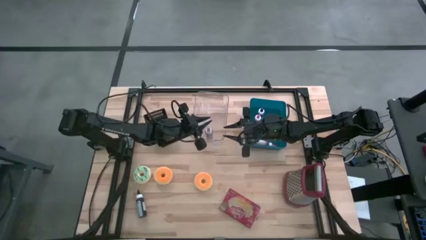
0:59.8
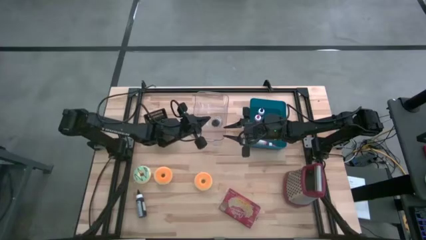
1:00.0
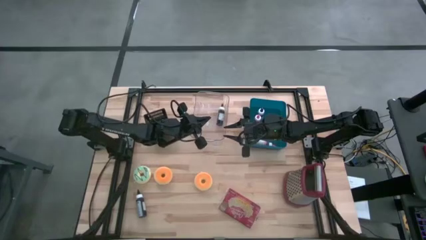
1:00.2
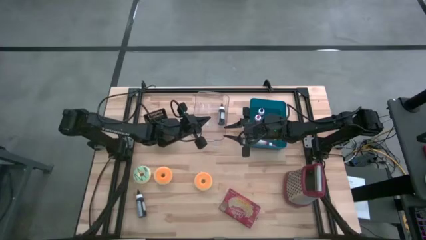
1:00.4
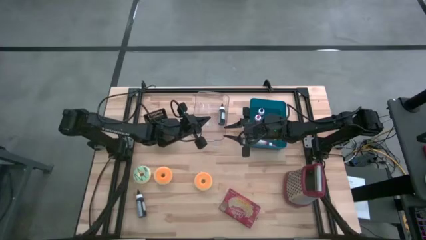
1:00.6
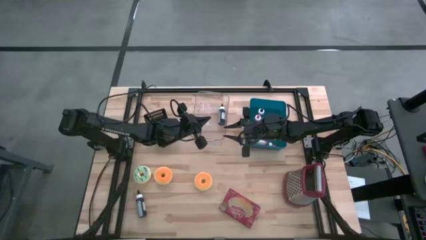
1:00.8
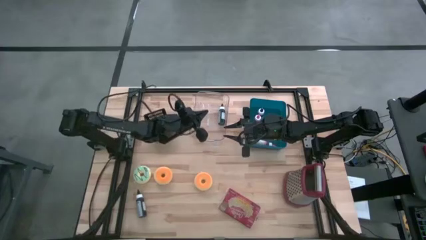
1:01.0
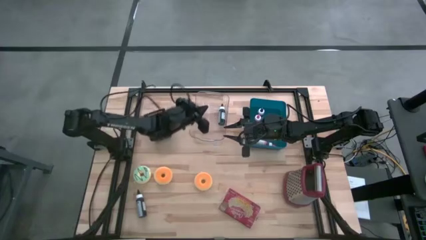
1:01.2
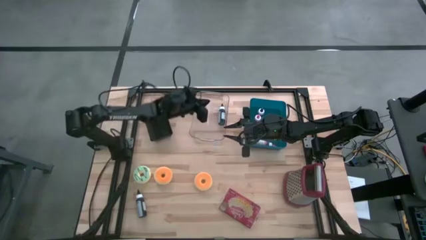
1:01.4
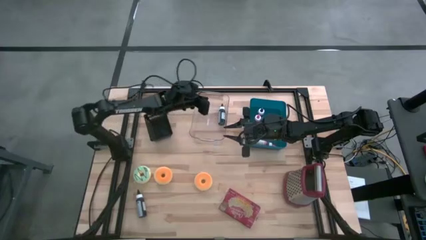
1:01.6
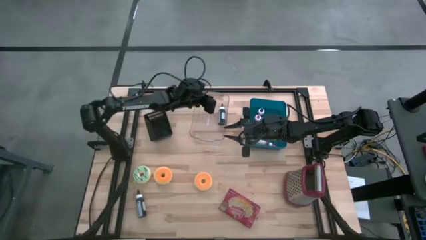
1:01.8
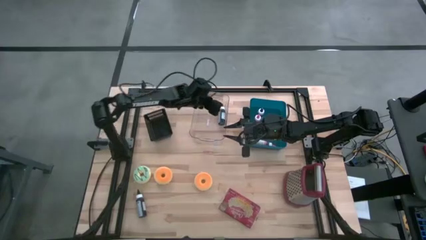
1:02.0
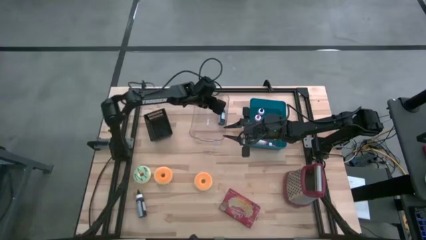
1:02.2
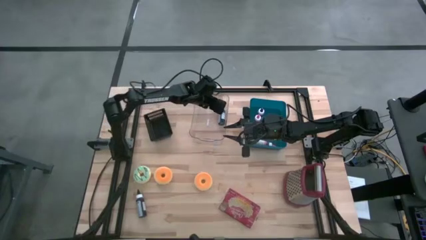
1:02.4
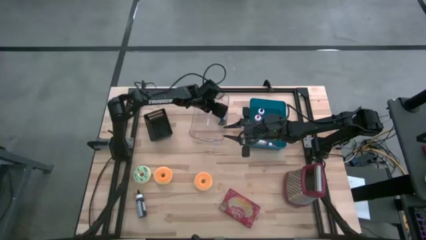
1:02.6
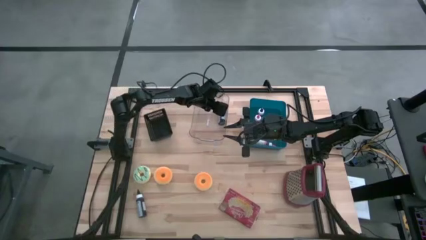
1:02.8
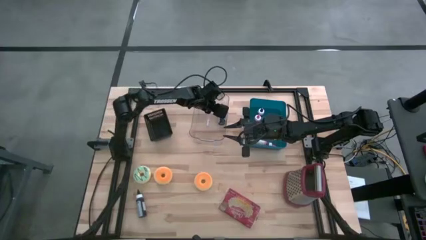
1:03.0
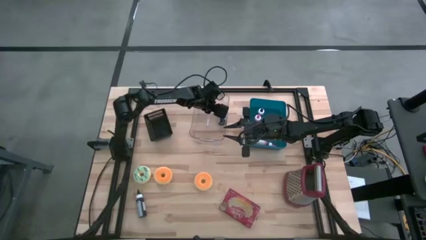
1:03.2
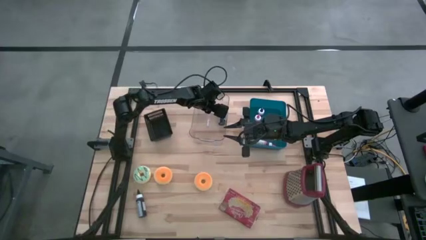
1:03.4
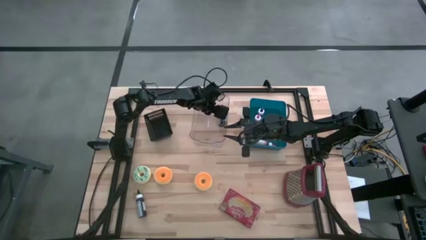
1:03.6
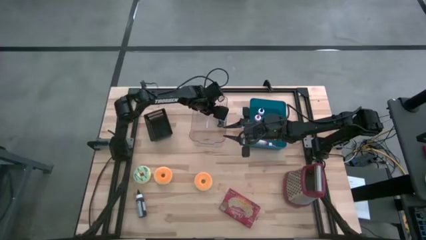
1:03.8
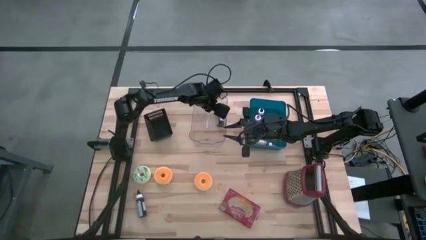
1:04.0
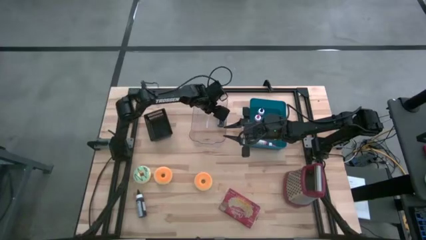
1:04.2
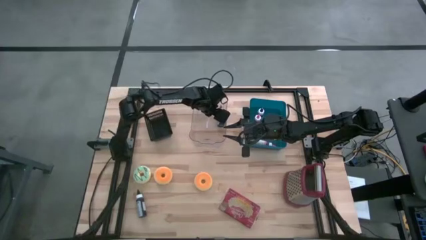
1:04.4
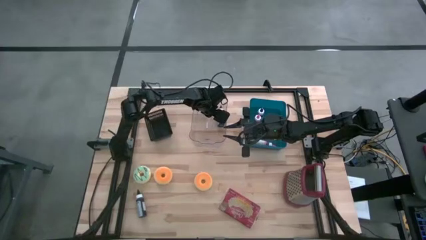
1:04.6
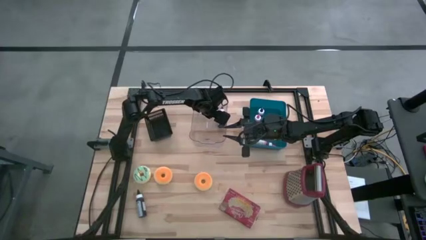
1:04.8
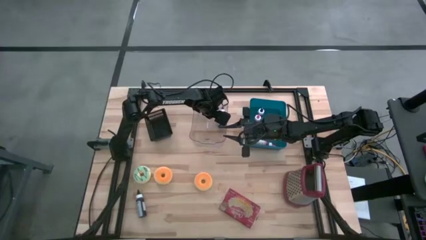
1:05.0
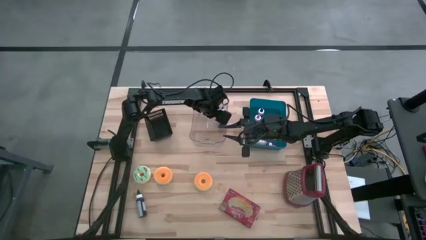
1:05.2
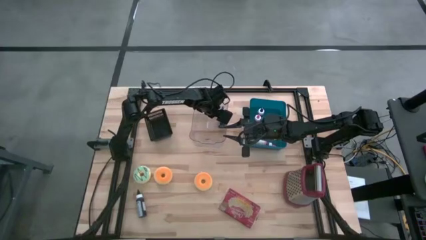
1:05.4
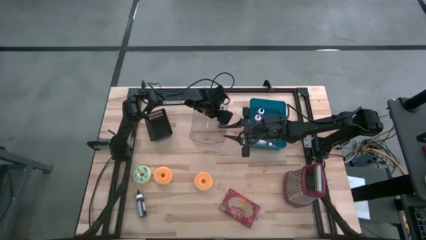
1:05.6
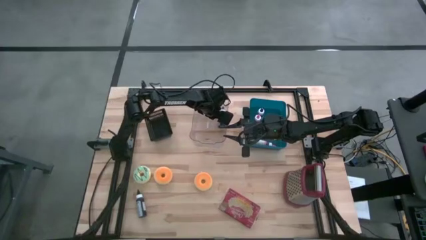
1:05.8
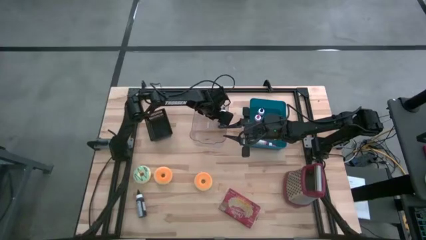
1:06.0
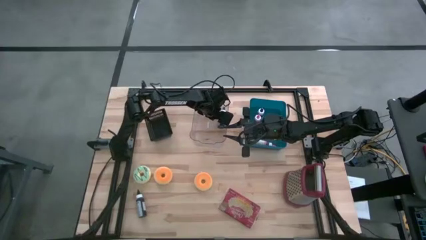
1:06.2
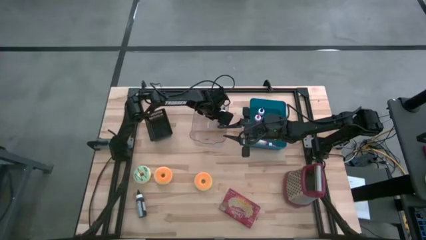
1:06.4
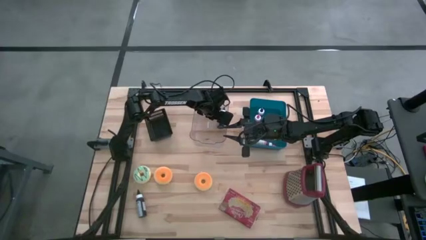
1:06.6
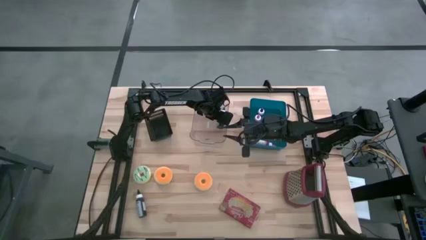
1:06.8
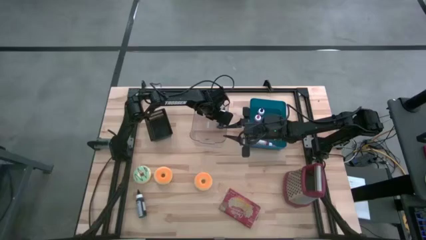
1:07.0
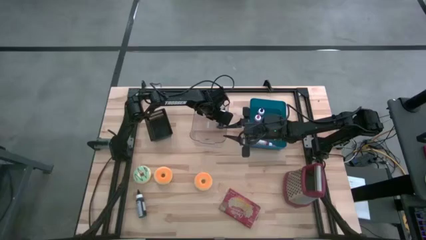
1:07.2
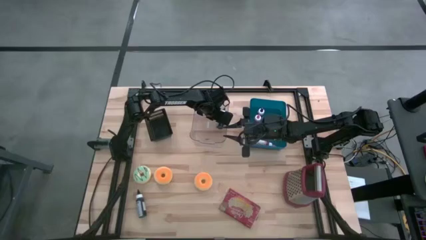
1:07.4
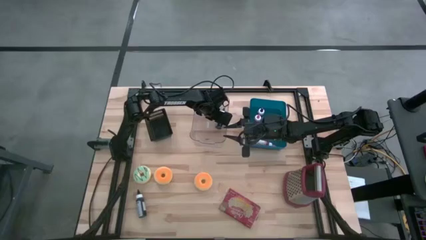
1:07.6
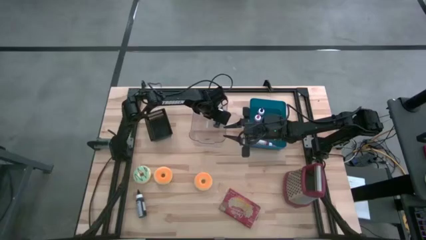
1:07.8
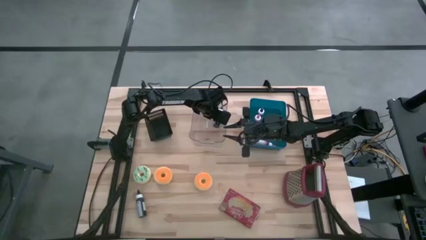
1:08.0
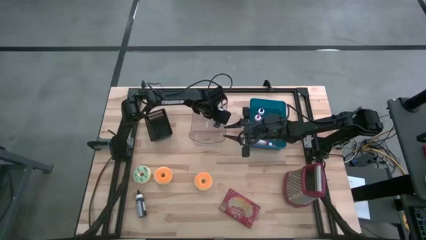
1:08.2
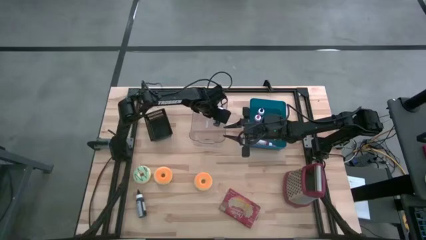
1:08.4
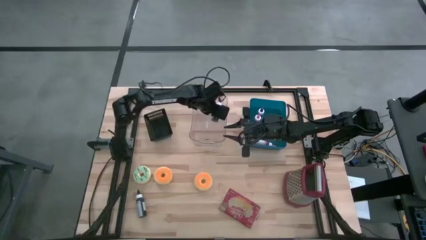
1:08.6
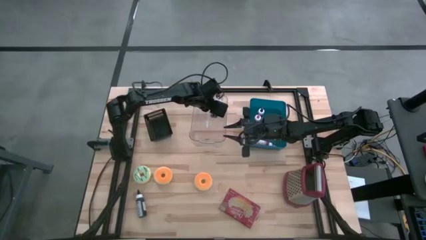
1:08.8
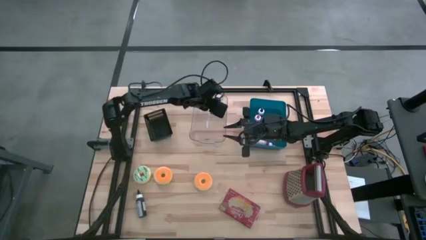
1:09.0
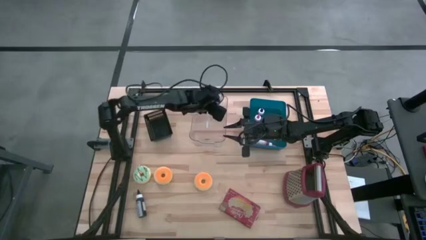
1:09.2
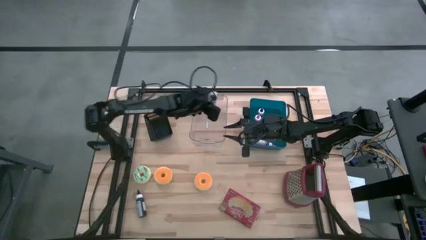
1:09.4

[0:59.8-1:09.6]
Task: Pick & Place Food Item
Put the right black food coloring bottle into the blue bin

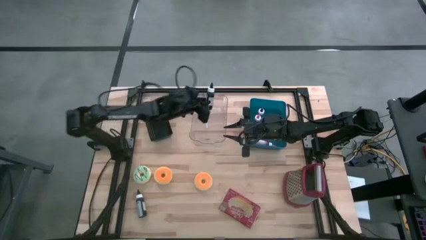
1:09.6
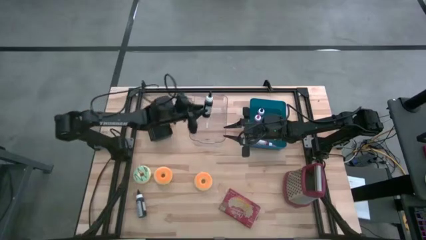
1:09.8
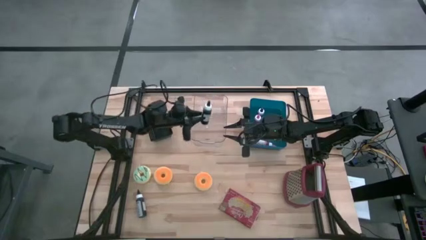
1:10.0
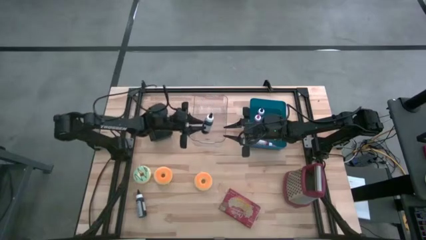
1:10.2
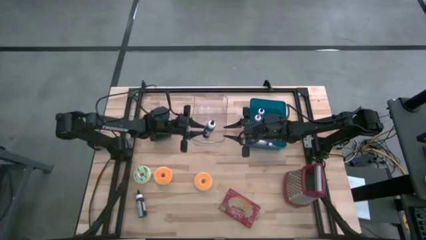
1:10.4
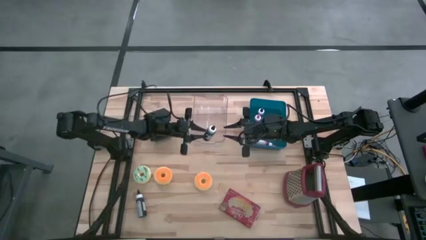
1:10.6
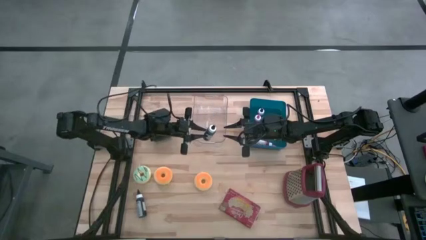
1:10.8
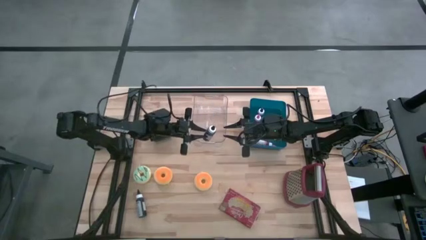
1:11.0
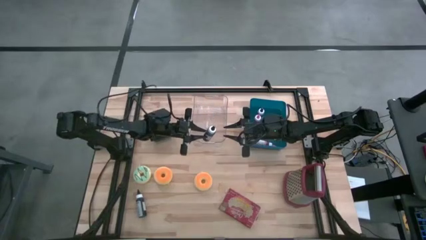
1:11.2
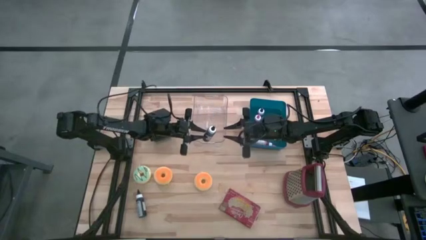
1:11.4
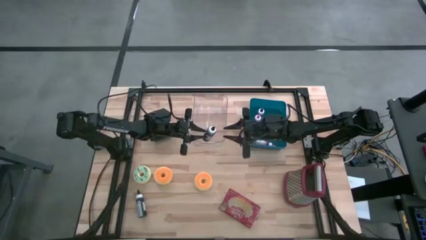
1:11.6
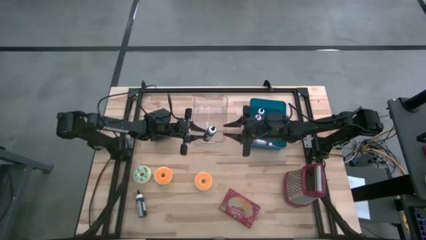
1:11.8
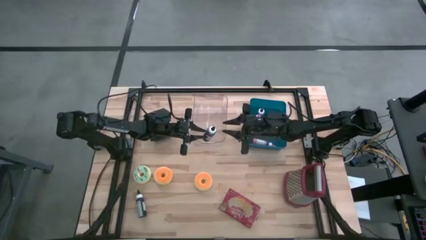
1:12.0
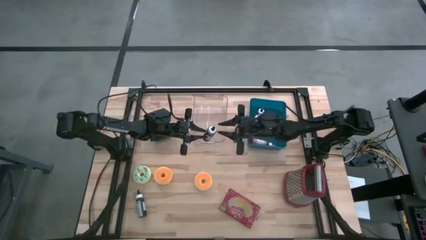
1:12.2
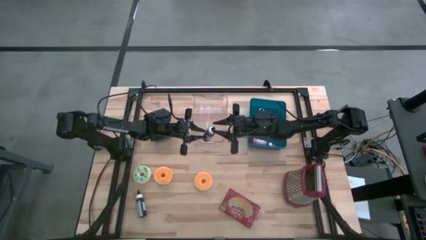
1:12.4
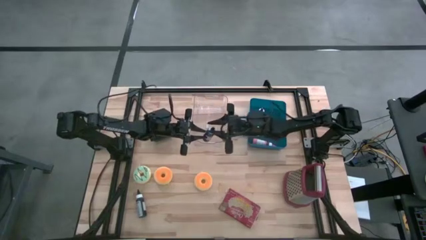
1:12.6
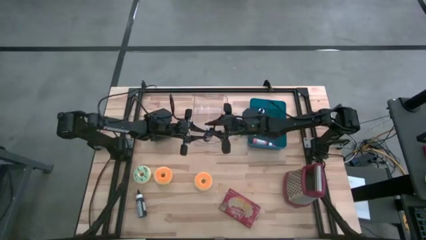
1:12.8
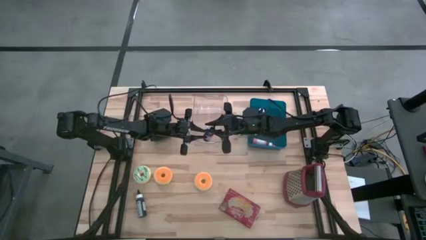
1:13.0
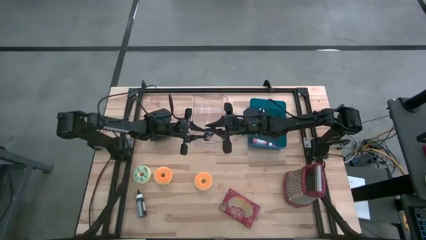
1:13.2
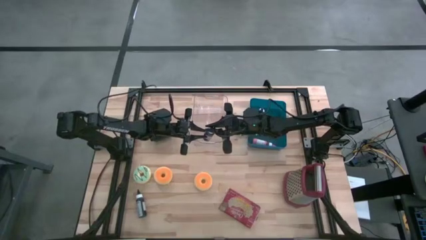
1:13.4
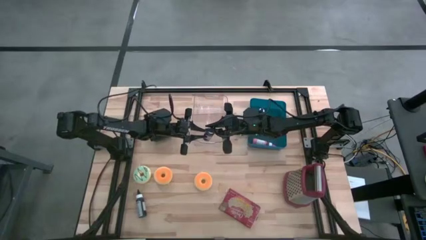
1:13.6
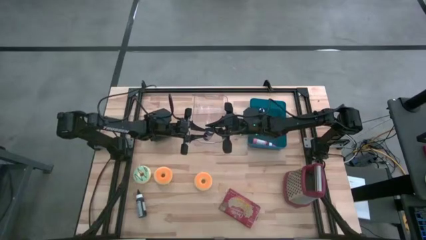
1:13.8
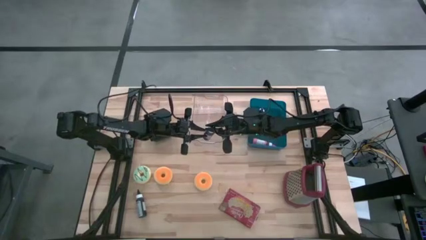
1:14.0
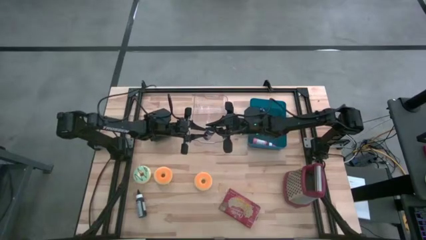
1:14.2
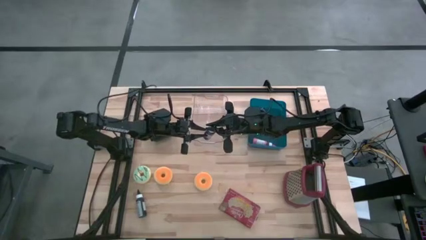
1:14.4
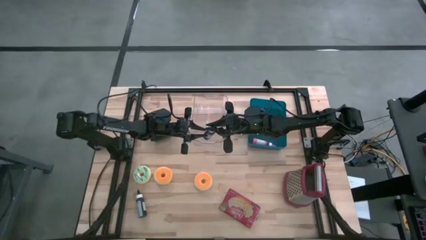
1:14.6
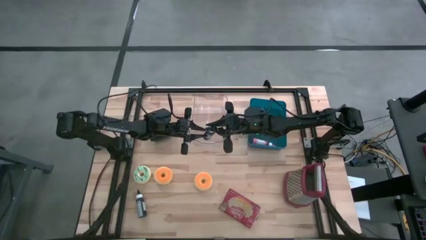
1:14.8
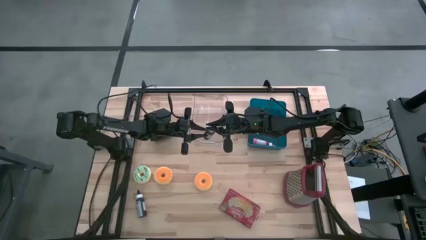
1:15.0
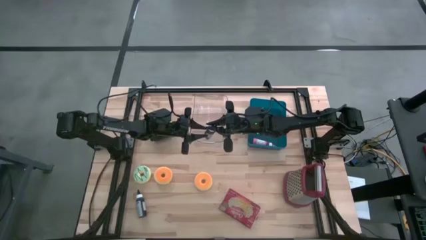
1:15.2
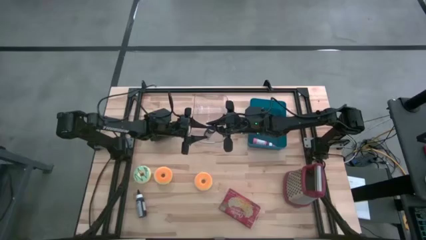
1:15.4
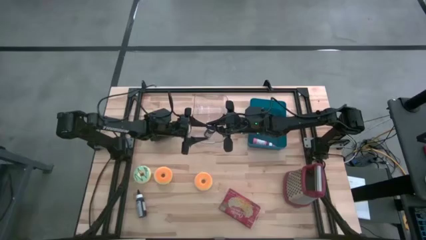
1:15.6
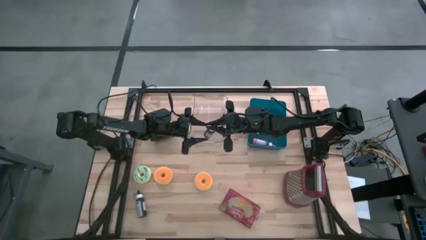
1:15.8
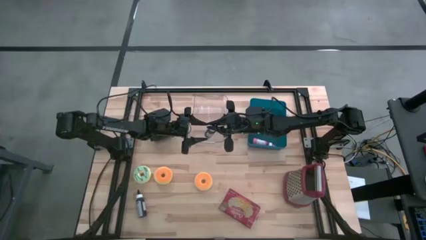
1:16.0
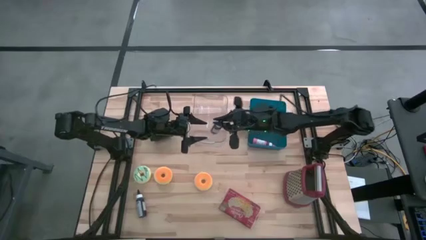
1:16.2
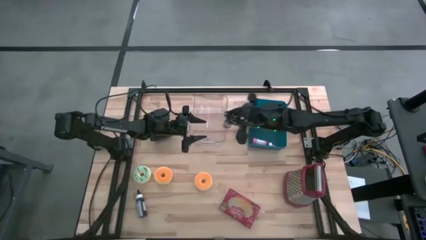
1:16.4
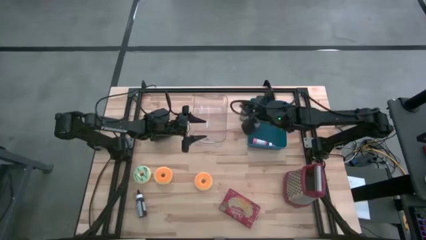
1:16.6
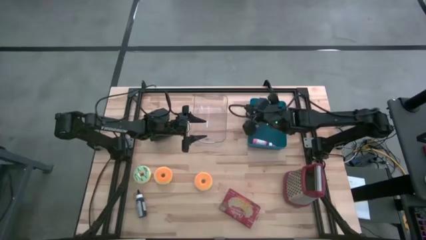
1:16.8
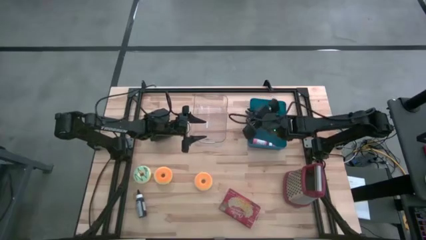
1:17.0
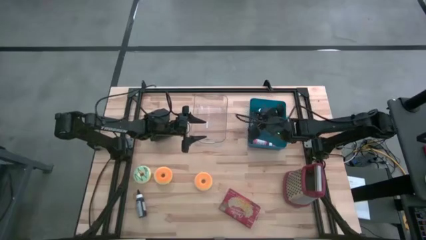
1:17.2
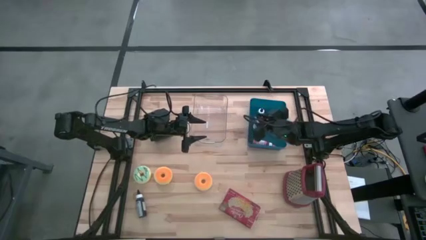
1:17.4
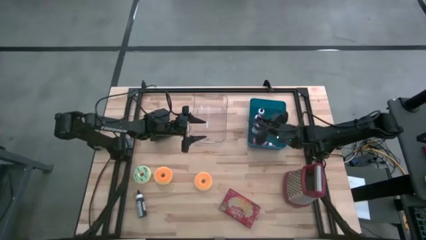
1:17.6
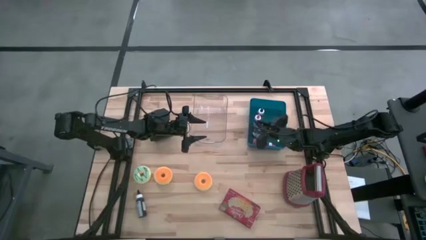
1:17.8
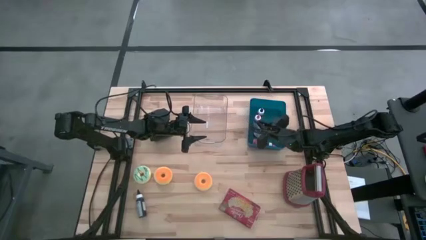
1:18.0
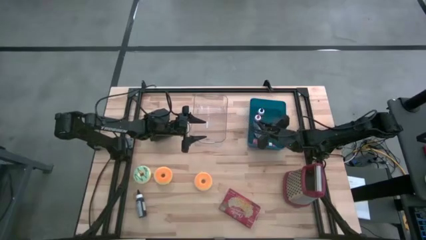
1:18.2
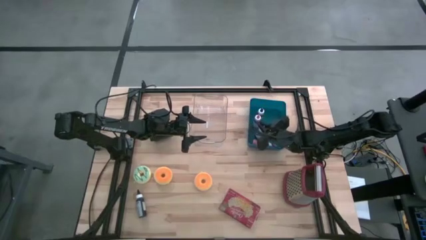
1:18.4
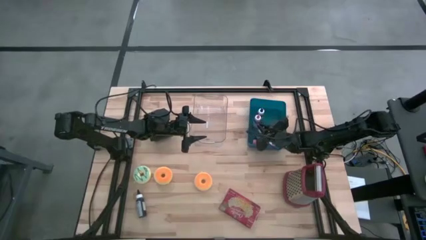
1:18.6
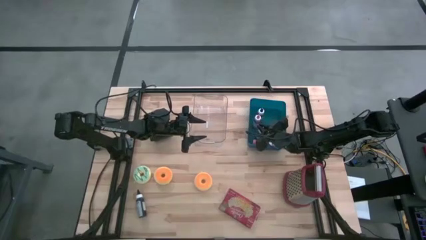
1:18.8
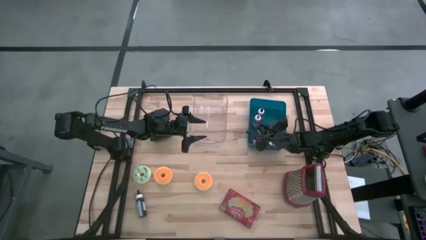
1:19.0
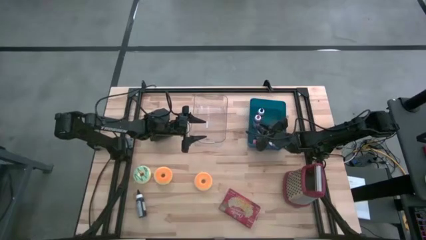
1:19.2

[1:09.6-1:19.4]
Put the right black food coloring bottle into the blue bin
